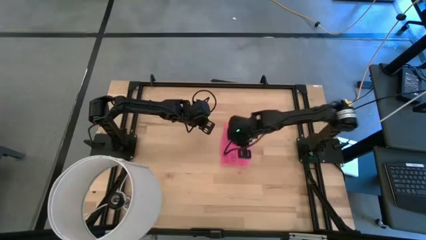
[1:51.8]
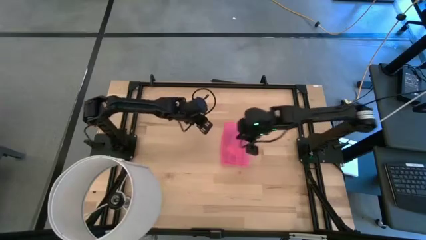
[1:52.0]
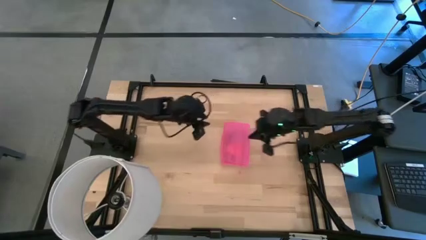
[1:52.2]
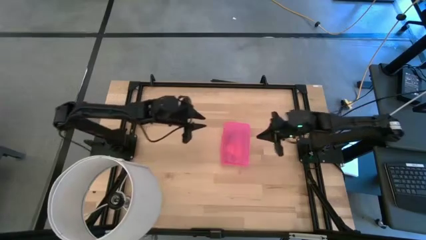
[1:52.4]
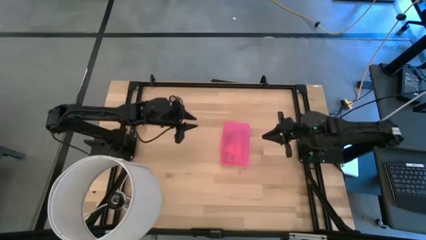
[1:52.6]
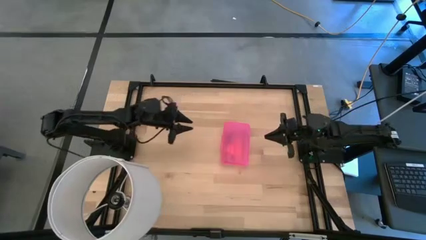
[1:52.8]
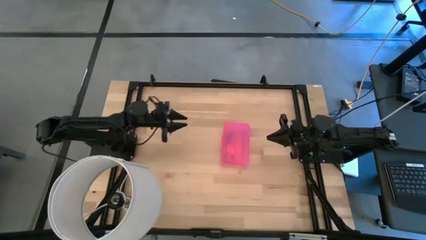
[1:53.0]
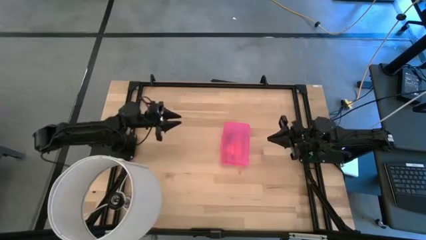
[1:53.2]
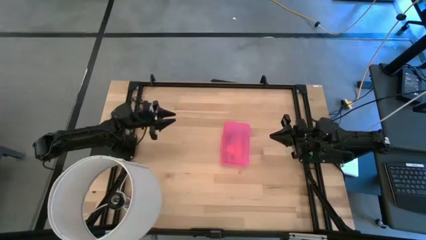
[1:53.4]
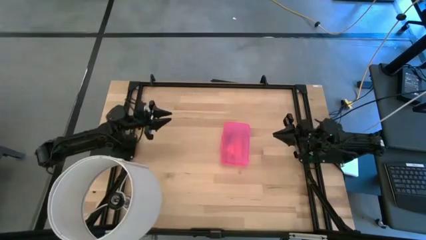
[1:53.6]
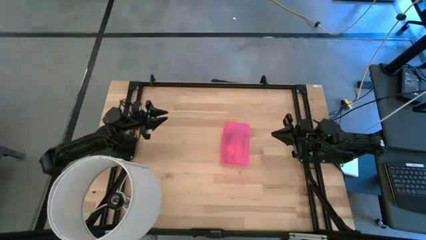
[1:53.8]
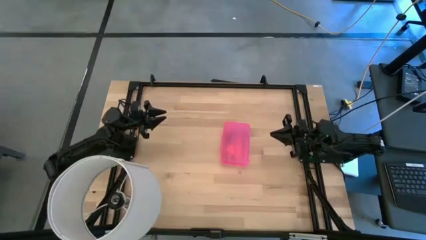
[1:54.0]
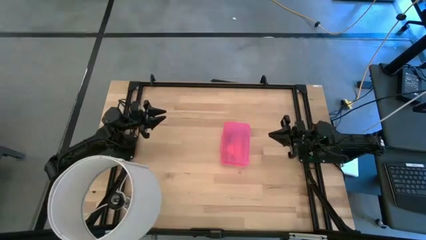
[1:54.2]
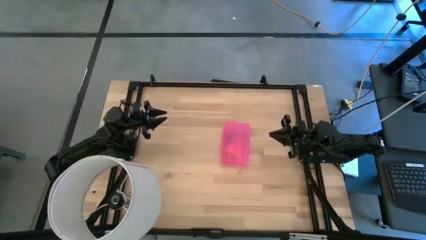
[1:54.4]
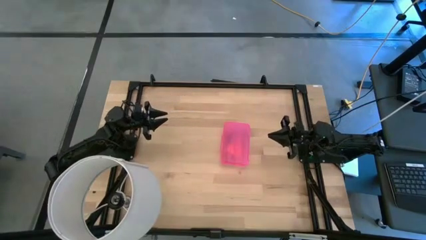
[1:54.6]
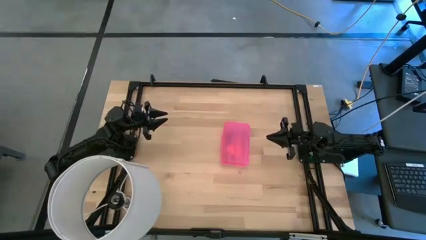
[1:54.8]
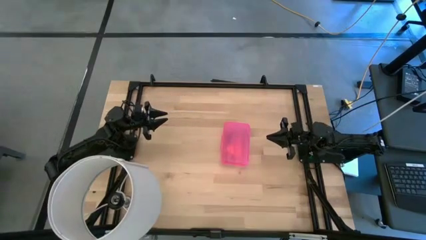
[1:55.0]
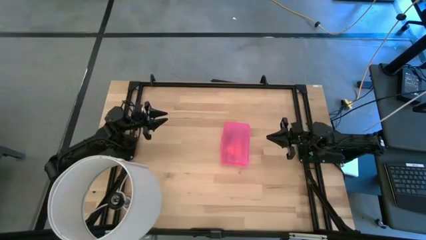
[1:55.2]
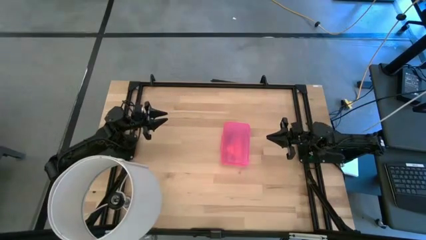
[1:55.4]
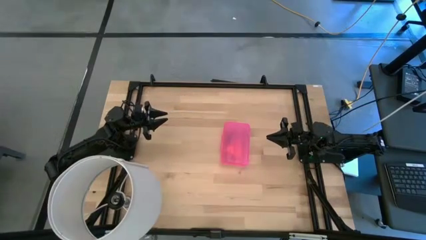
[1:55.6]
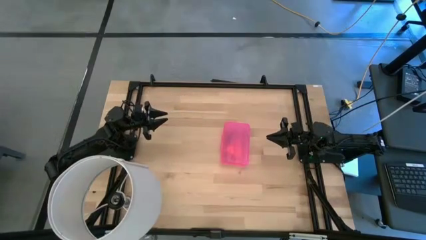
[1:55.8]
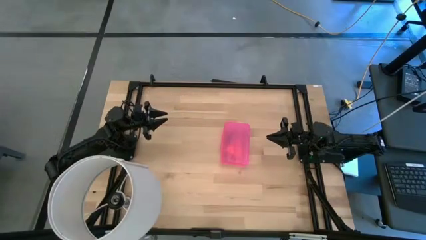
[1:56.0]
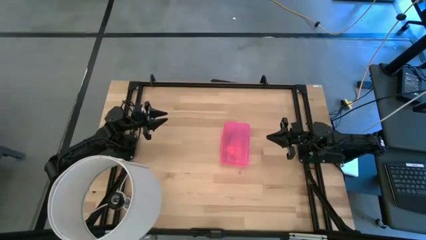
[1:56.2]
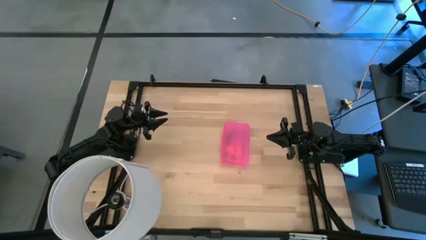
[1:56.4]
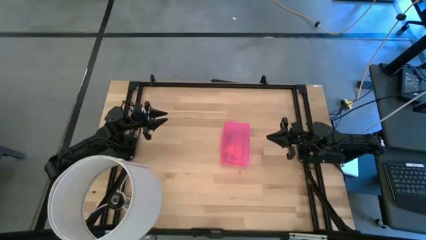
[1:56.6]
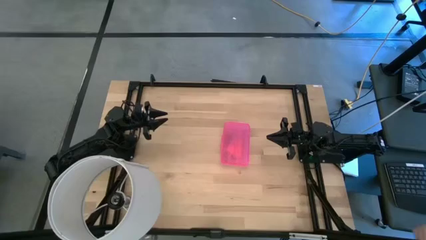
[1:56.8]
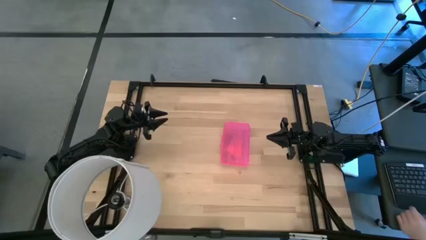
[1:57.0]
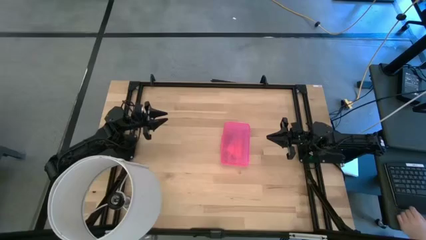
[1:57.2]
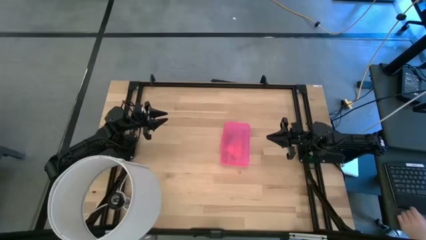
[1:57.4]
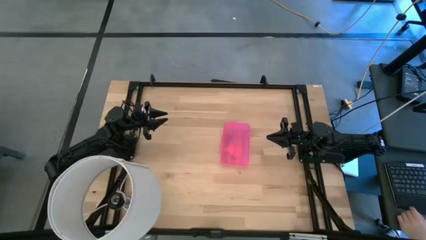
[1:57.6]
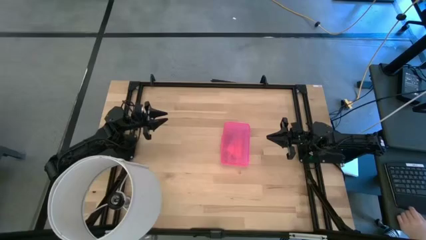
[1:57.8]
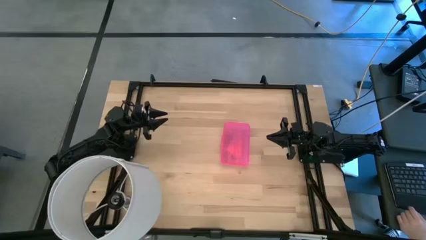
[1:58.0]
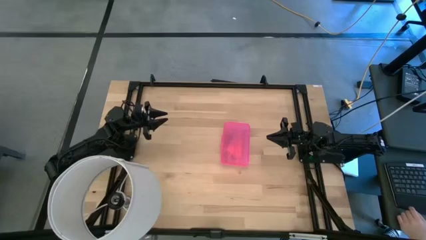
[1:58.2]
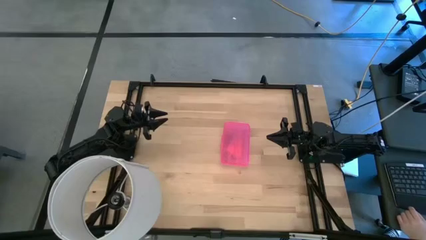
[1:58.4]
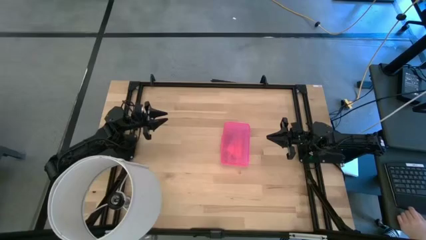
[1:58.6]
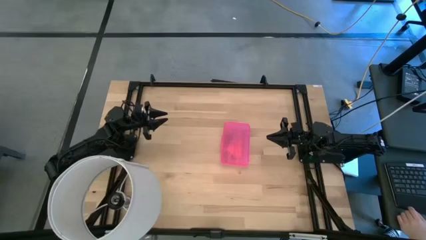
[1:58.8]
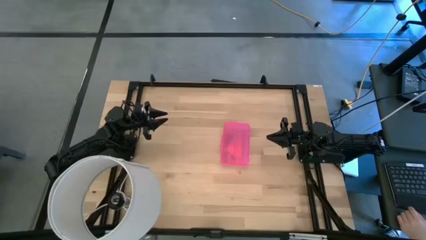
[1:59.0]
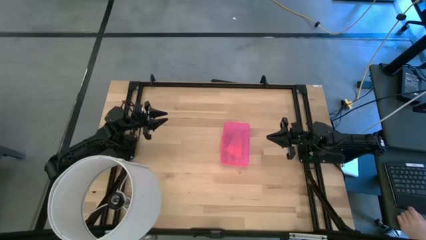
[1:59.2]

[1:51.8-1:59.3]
Task: Pick & place school supplies into a supply box
Return To Home Position

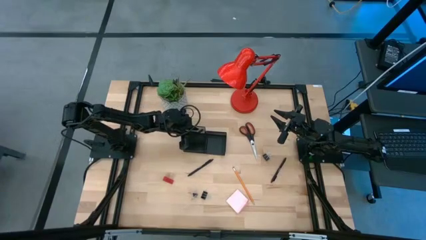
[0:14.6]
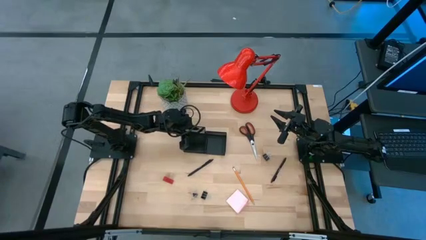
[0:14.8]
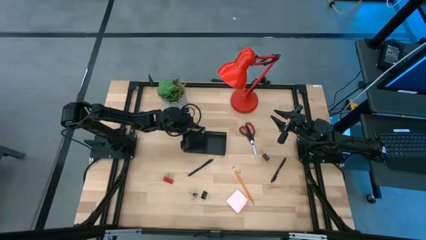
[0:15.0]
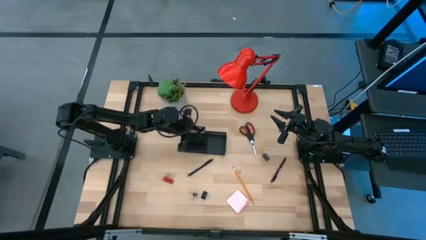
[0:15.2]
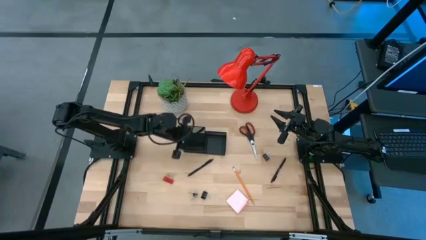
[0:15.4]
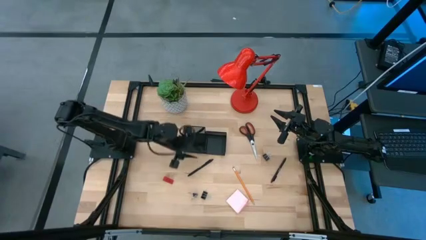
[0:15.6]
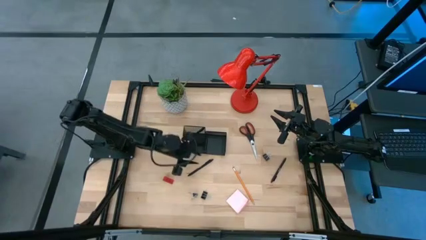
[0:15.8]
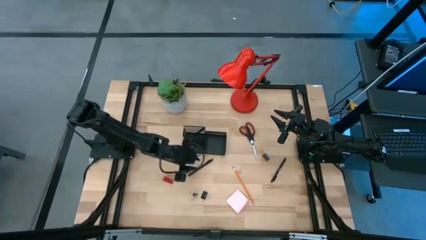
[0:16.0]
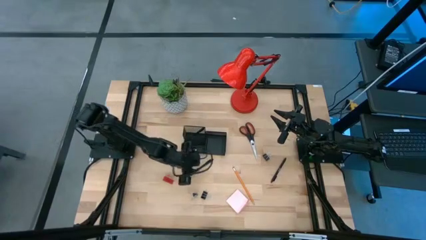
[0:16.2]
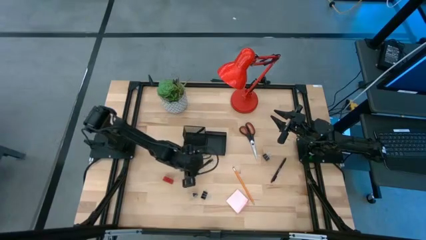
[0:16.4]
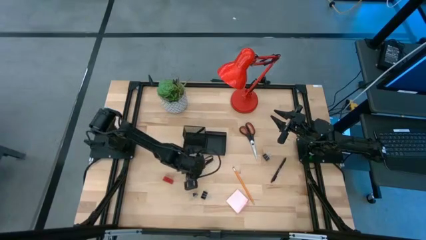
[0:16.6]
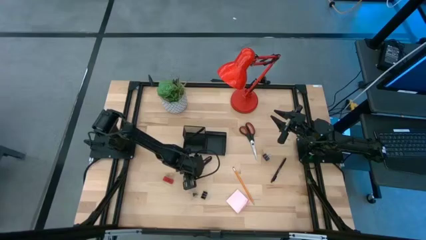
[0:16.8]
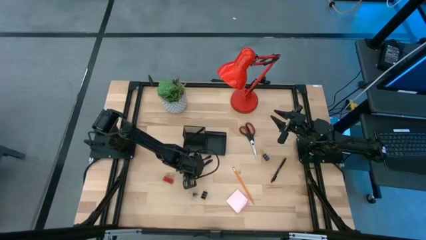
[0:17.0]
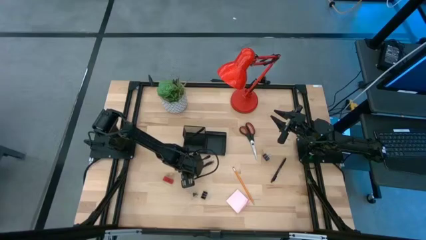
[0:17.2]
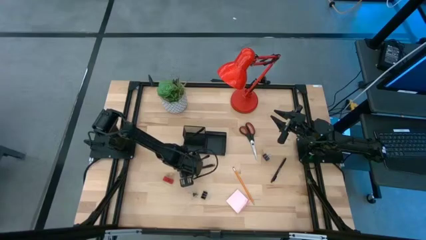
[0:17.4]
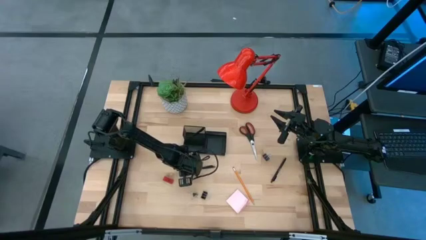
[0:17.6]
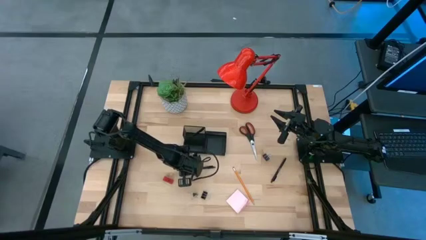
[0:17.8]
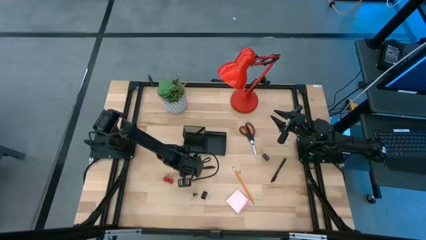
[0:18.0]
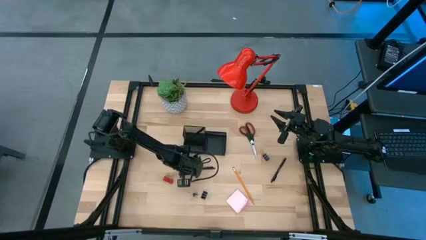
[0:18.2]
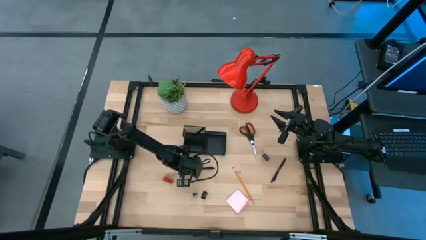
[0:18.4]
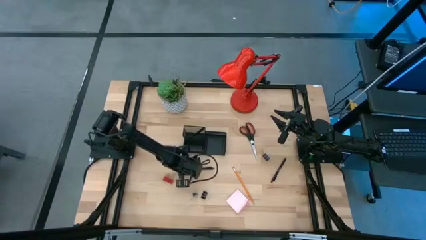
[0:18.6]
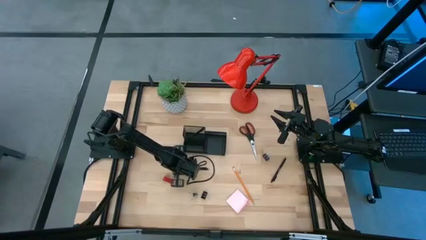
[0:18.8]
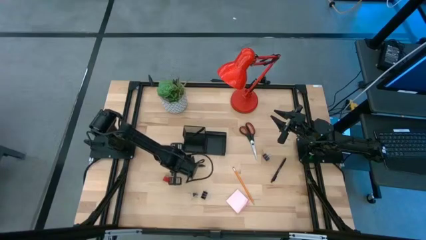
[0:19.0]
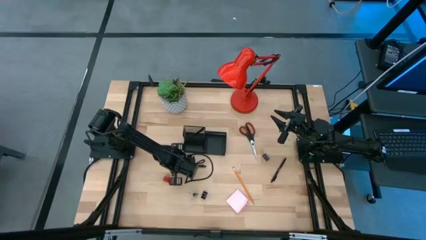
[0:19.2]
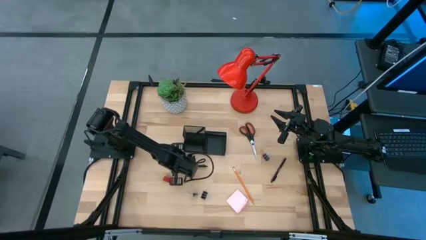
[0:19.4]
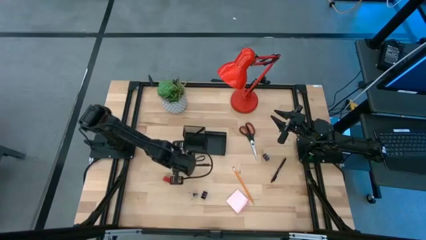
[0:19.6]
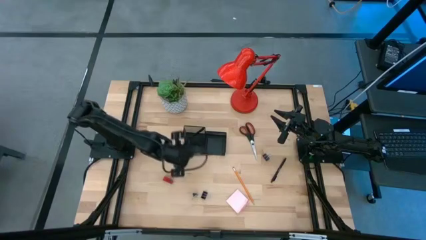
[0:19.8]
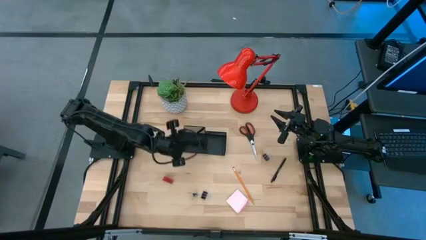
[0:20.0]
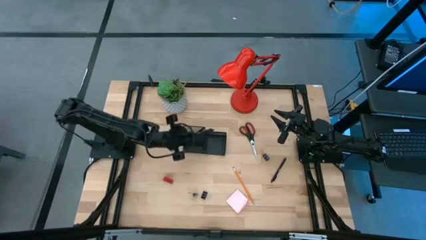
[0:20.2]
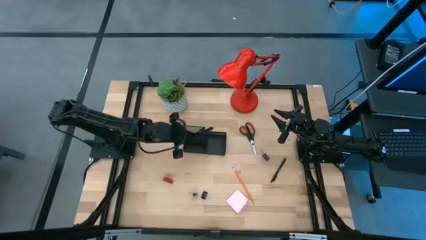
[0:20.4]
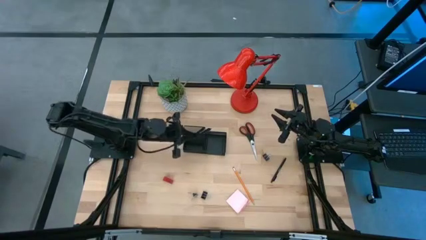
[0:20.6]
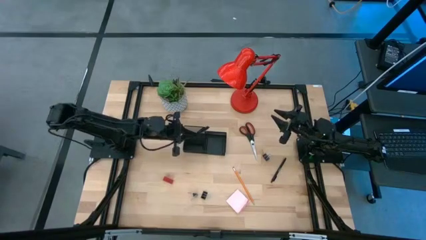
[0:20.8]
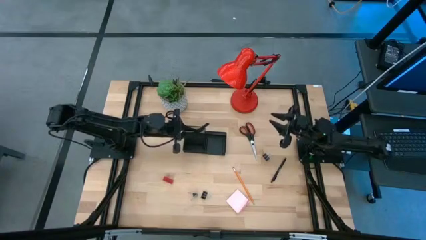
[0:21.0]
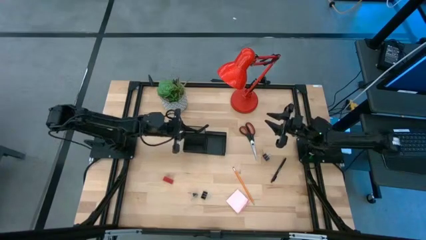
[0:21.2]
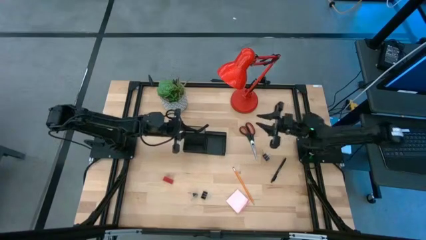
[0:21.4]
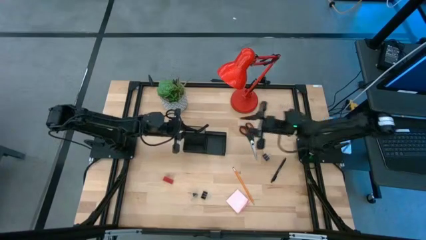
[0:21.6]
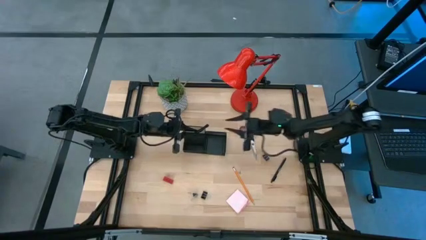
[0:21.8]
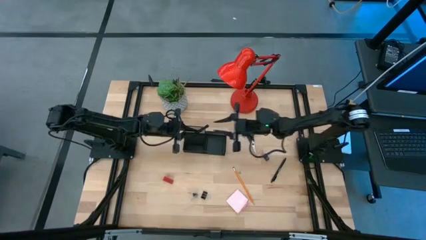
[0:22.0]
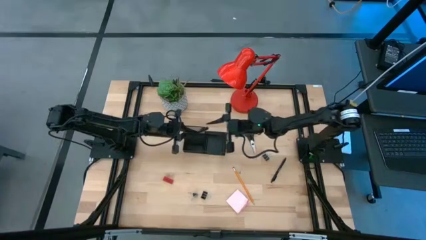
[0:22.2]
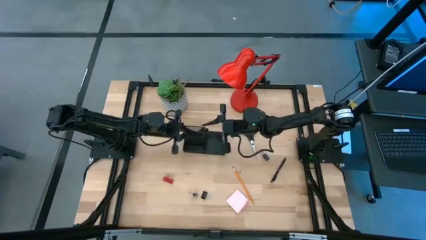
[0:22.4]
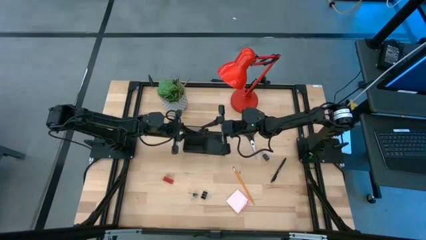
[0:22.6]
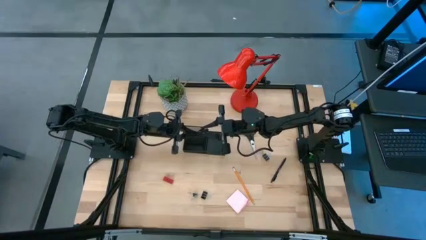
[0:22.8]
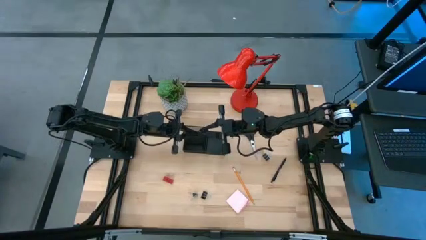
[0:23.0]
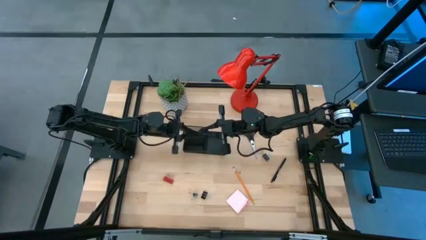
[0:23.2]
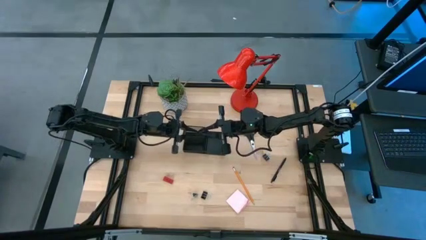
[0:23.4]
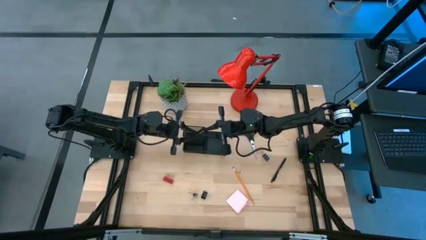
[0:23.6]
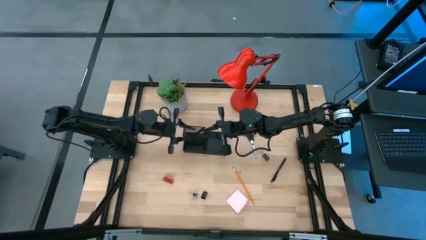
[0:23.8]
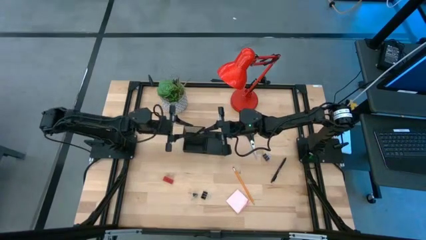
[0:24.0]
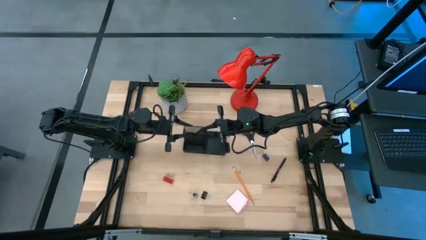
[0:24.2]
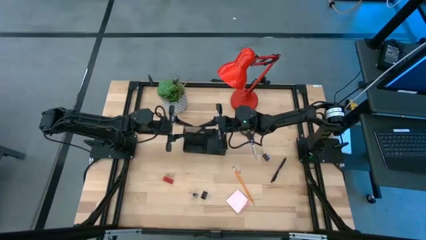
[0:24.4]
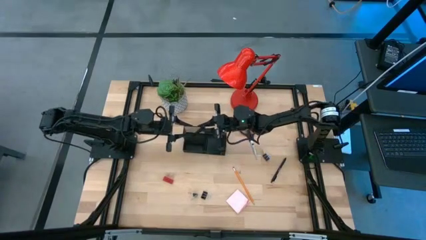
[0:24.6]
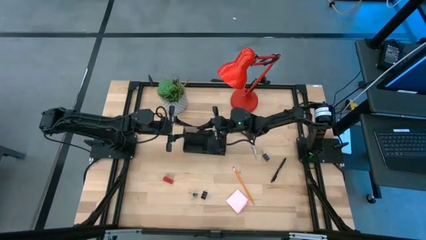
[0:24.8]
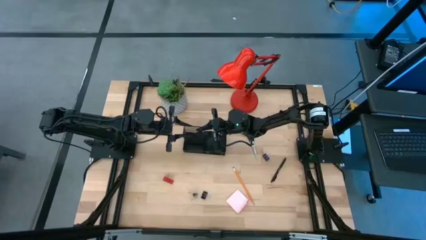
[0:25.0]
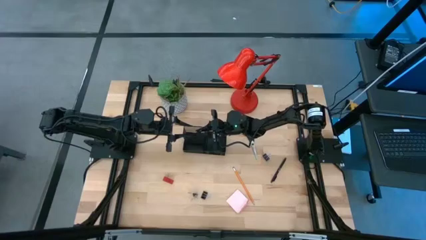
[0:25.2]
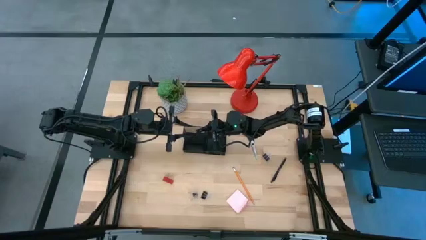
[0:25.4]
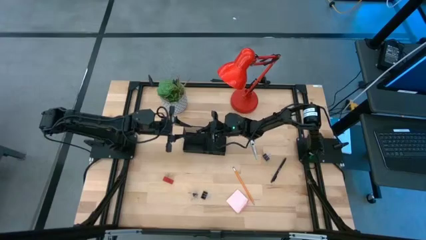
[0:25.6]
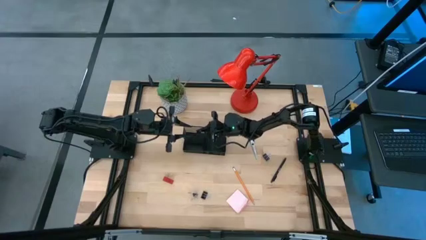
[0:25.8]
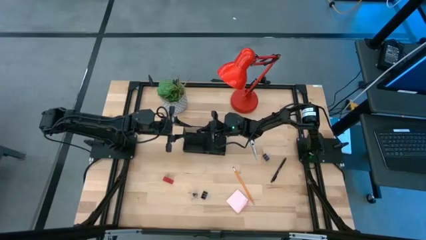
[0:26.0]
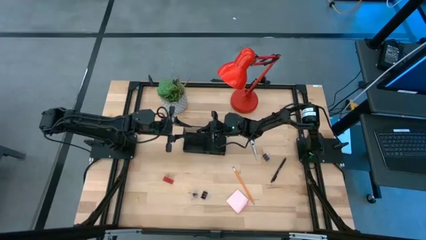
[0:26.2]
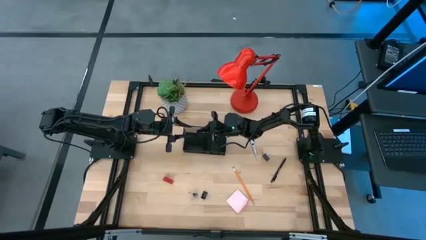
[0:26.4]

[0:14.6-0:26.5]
Task: Pick and place office supplies into organizer
Put the left black pen into the black desk organizer
